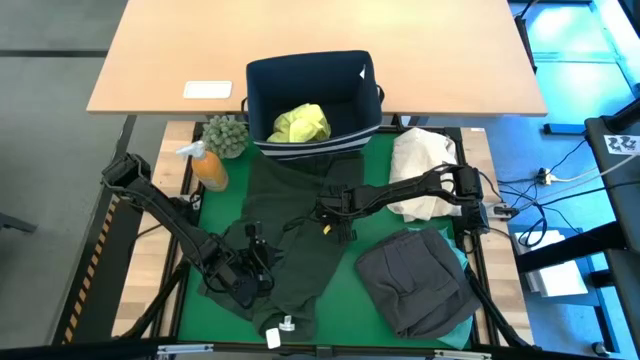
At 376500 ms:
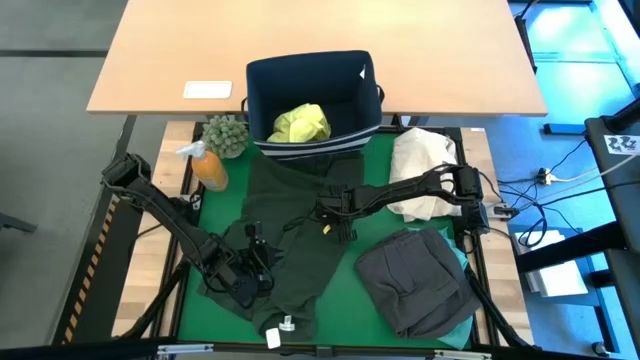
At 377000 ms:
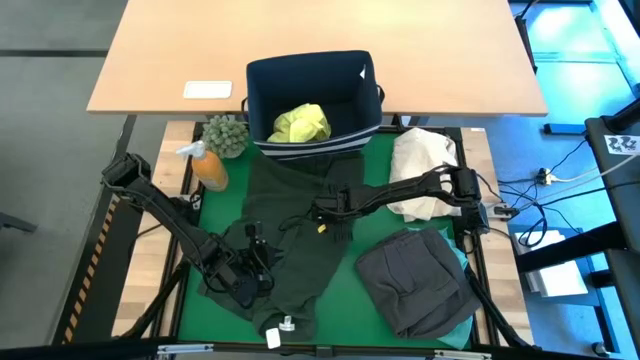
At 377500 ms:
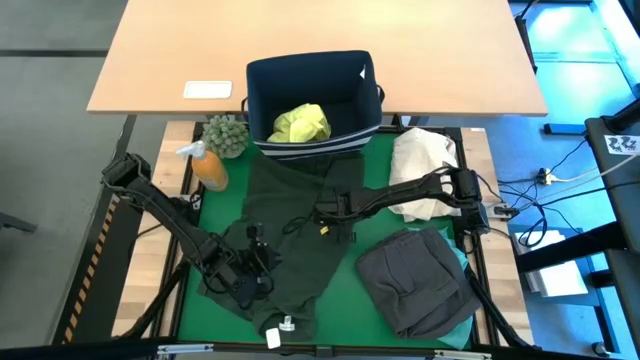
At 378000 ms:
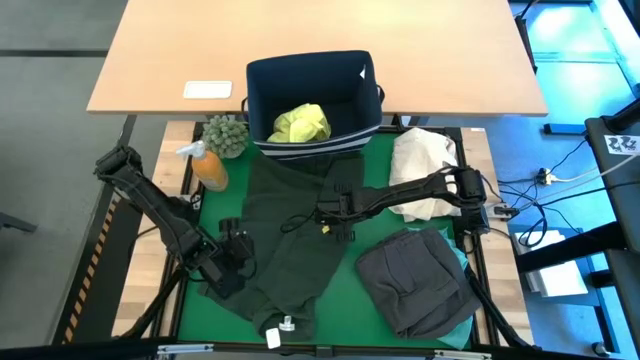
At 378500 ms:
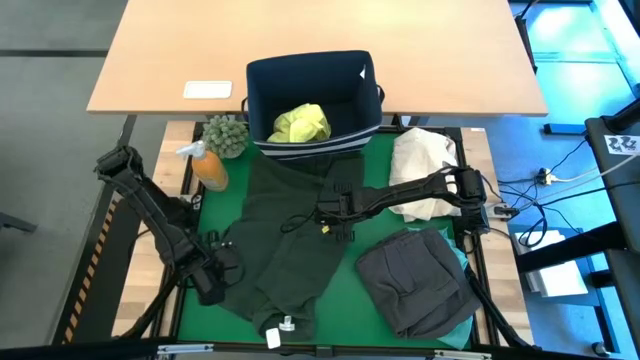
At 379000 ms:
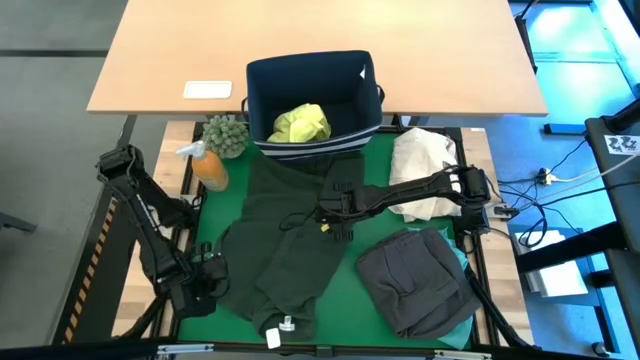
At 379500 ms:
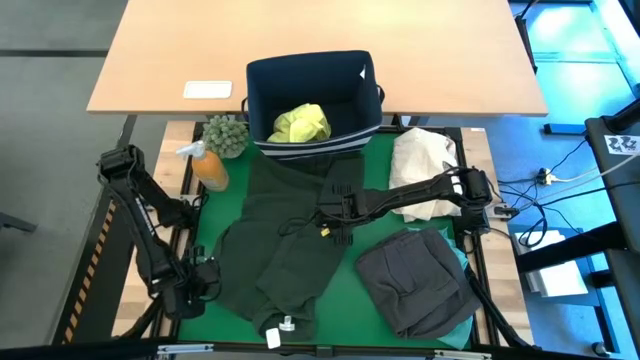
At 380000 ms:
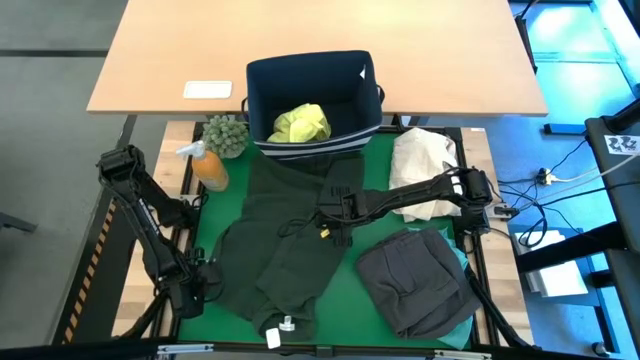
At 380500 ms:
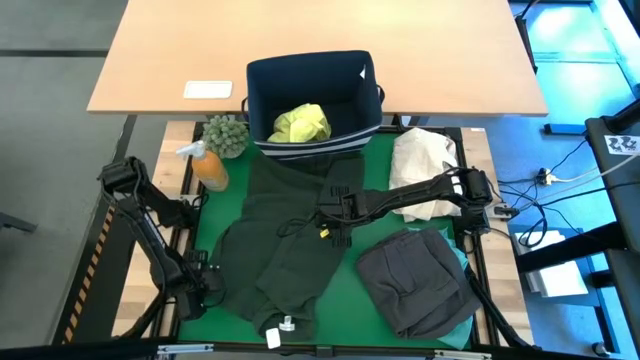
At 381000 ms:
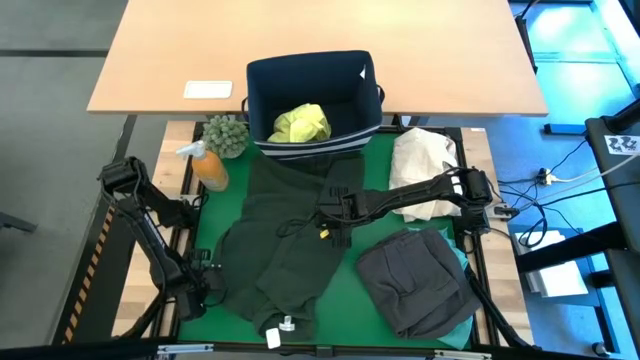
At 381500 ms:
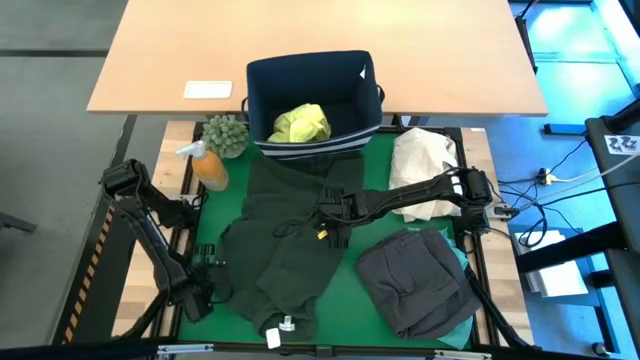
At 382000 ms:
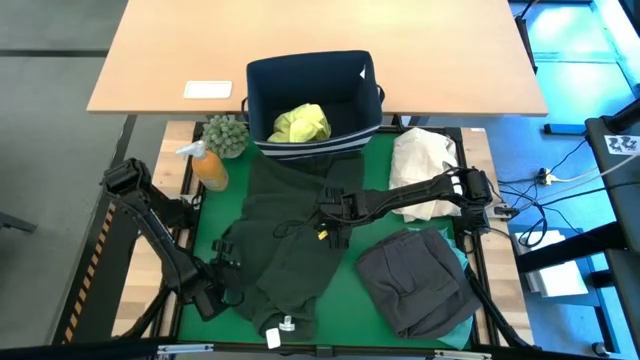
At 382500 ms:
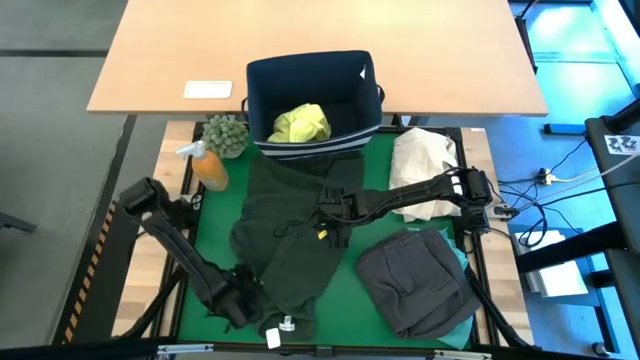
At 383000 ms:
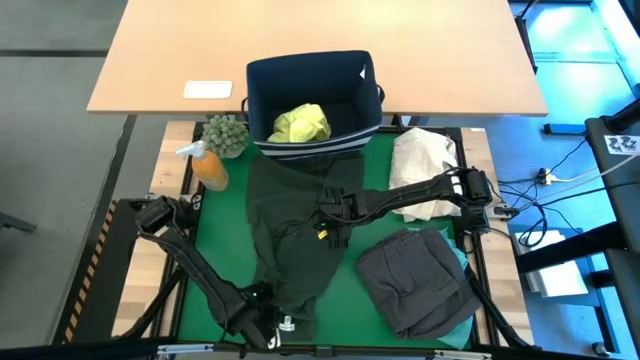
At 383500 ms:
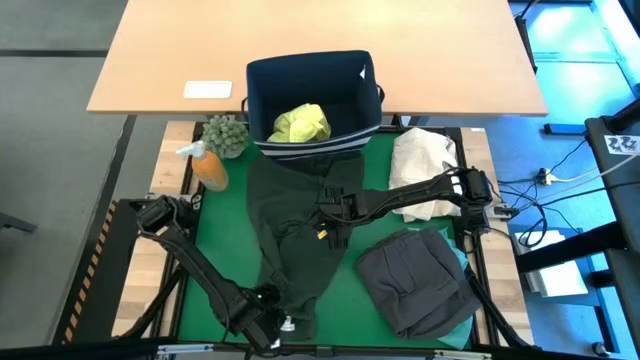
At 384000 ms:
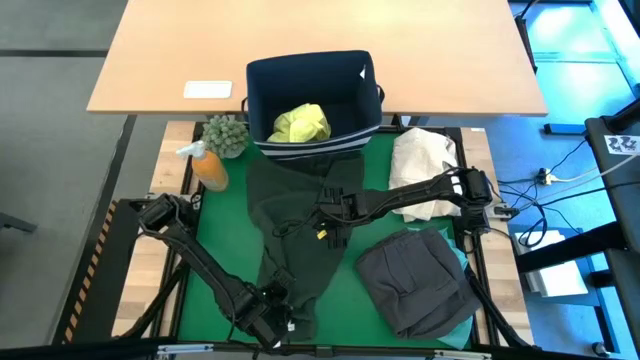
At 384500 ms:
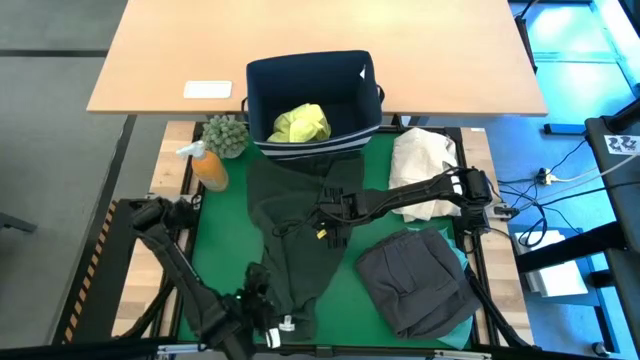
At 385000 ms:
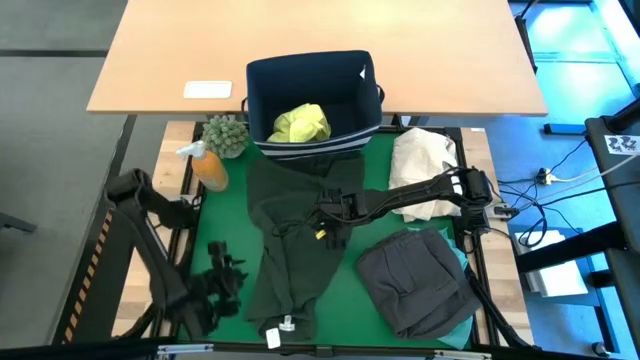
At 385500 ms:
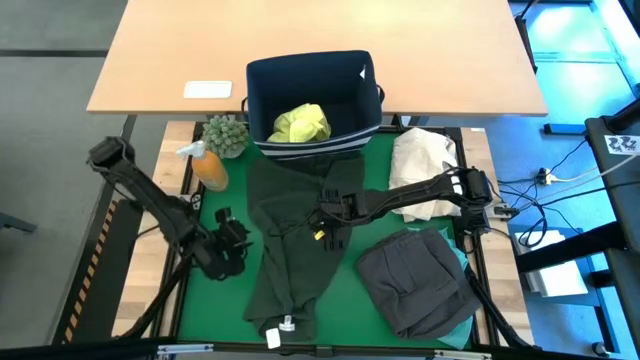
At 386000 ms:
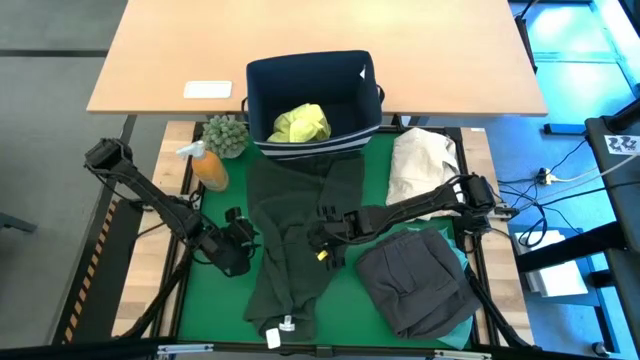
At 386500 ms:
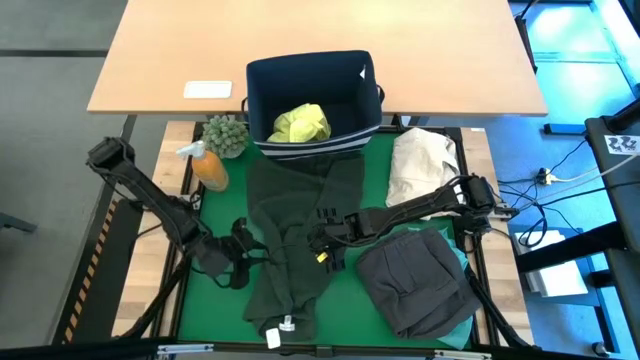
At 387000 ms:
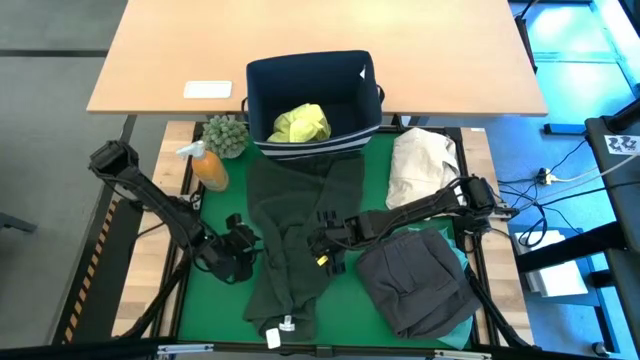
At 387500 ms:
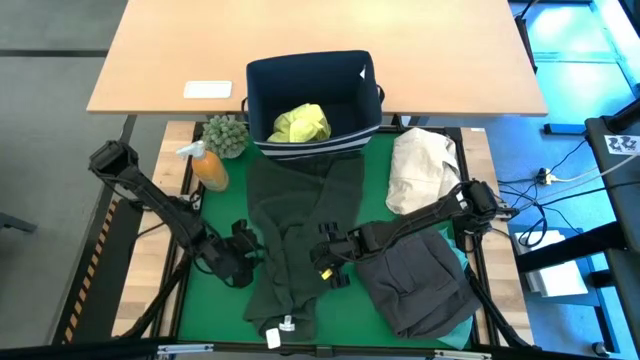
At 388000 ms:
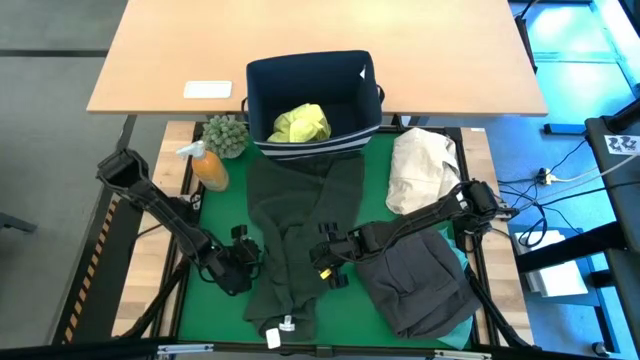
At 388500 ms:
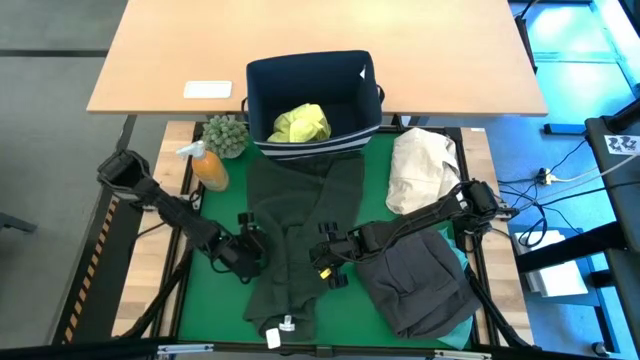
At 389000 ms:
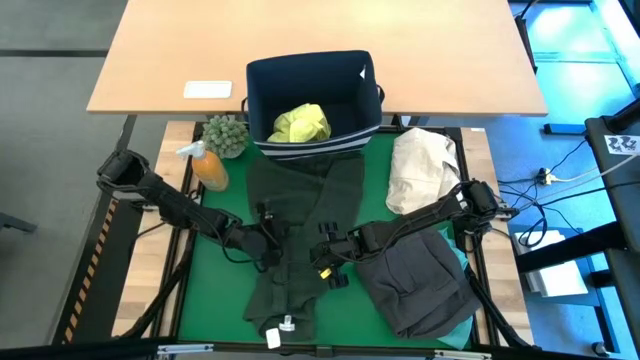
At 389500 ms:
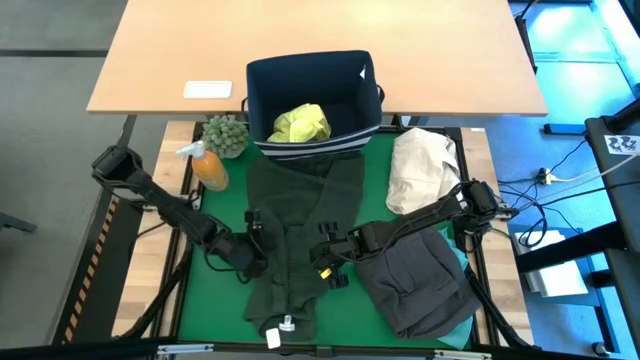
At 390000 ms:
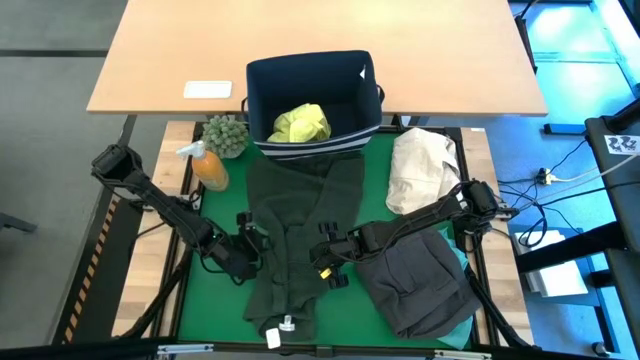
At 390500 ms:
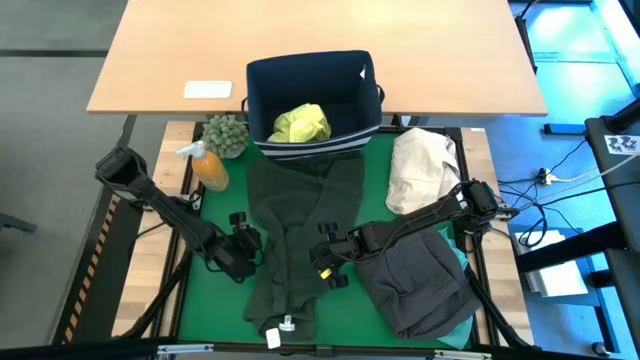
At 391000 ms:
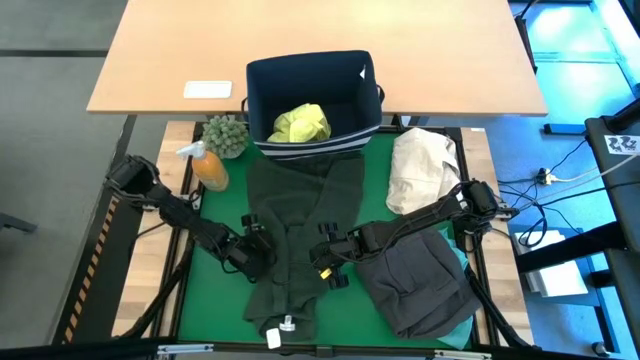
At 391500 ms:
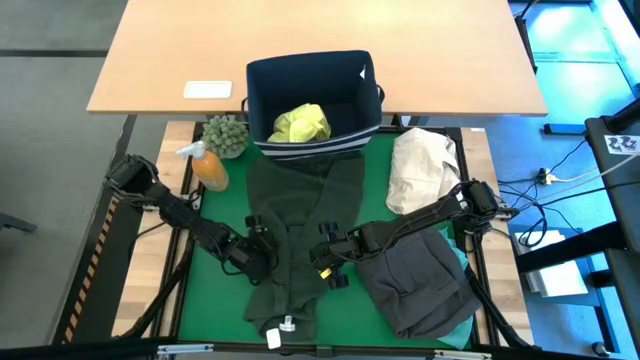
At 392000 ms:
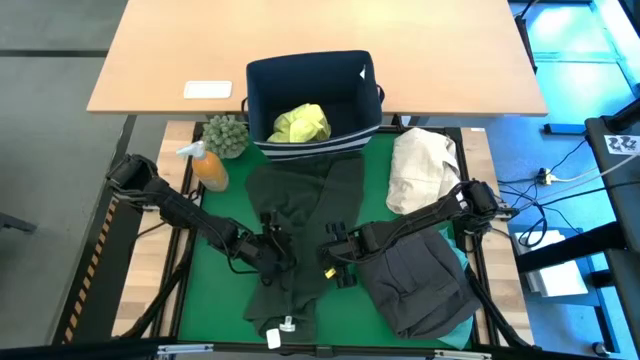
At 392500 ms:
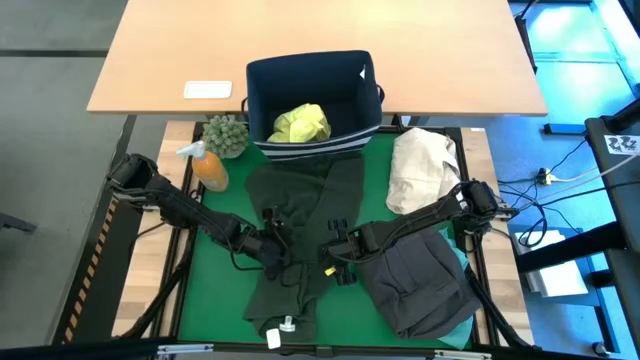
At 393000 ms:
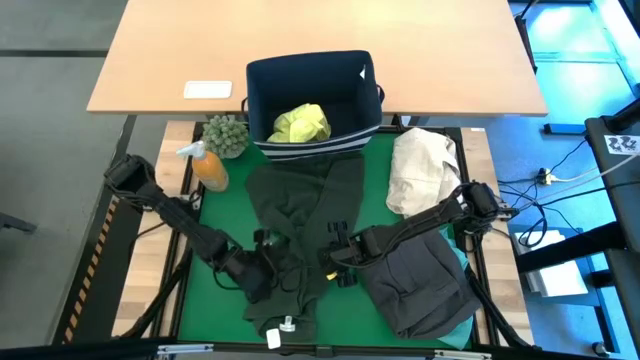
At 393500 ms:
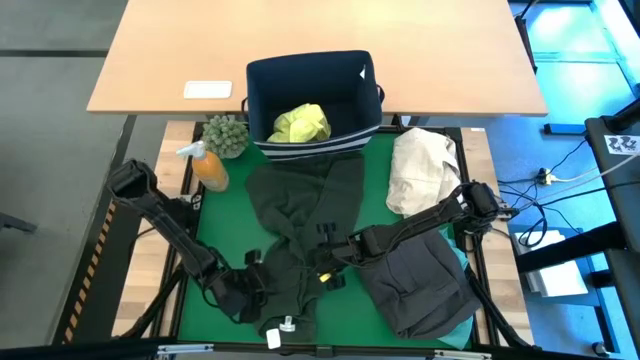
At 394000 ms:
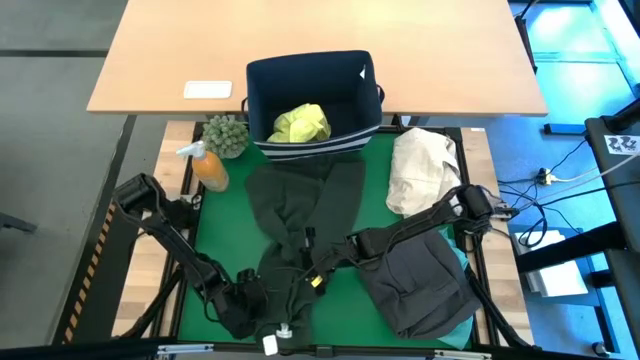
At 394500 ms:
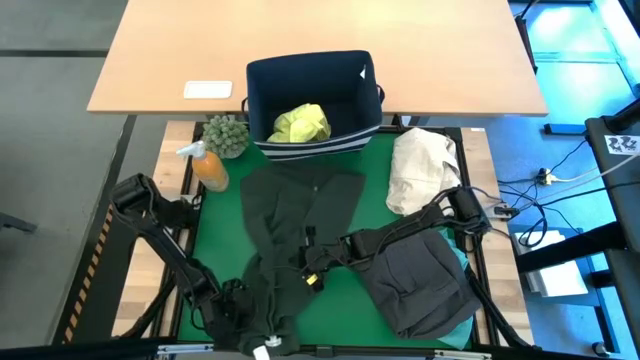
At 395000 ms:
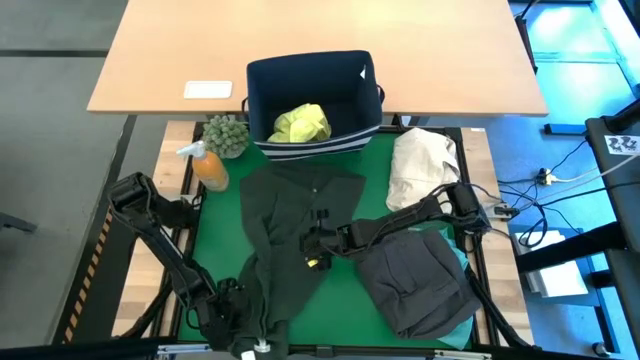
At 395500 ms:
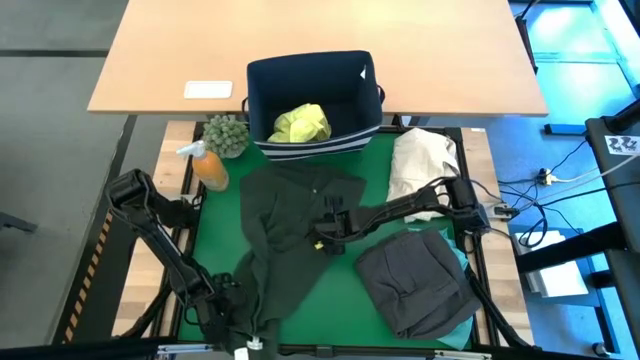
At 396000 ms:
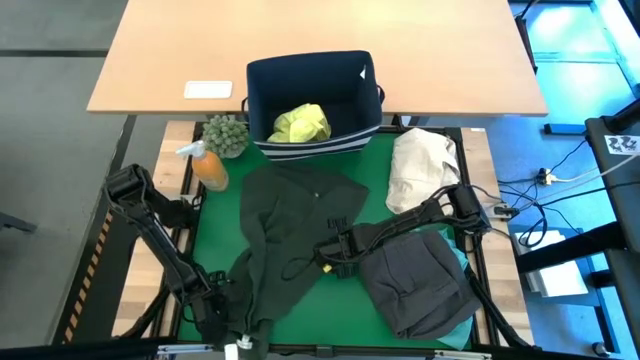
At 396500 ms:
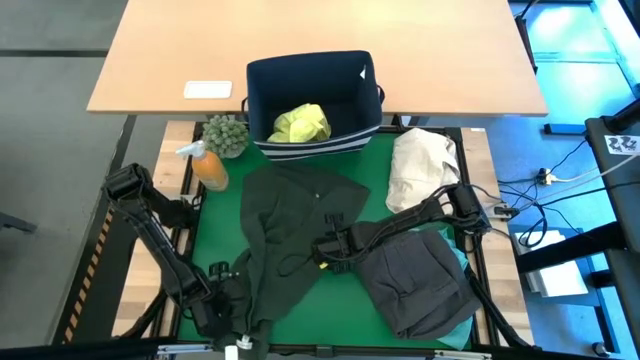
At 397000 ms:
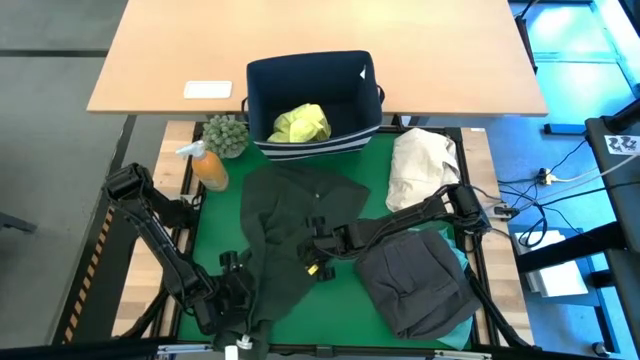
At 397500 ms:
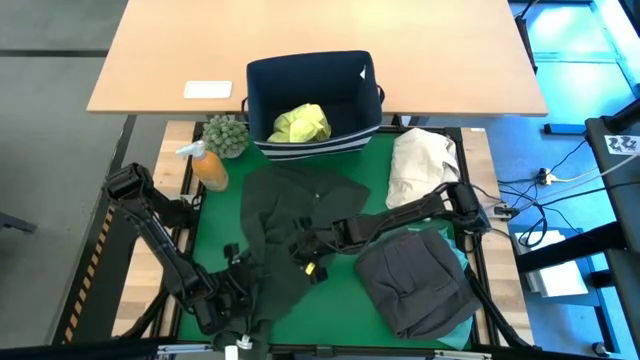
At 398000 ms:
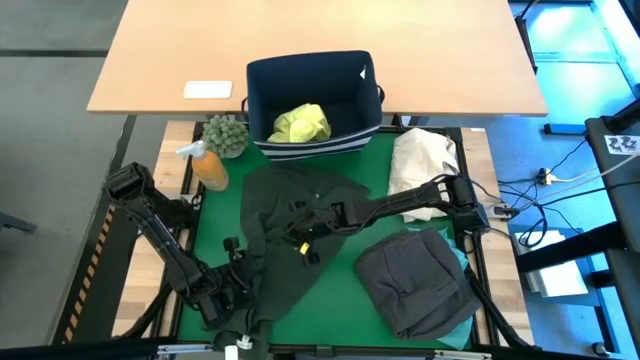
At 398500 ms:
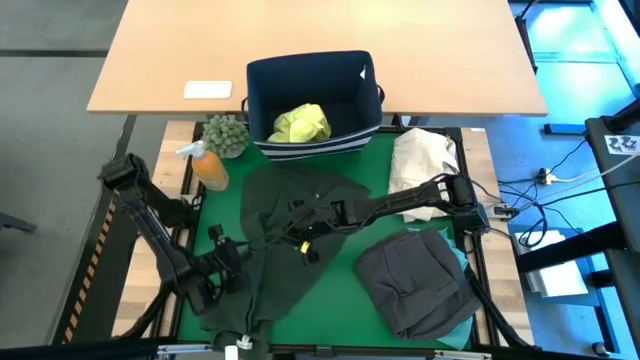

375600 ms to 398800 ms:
Task: Fold laundry
Fold the green polo shirt
